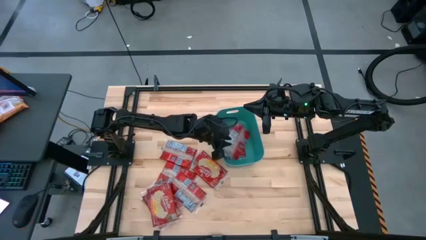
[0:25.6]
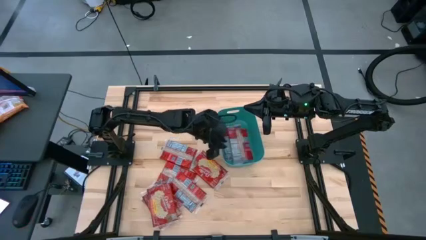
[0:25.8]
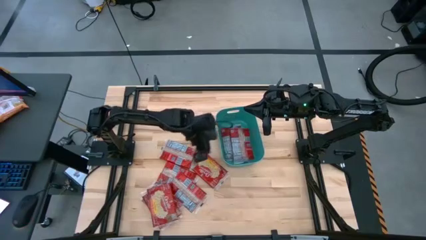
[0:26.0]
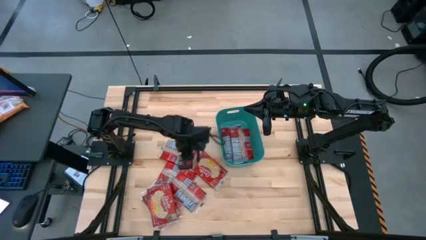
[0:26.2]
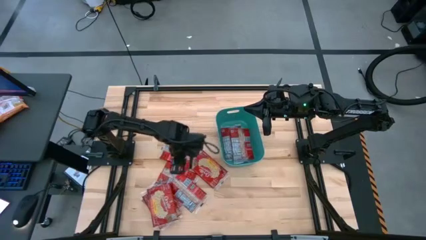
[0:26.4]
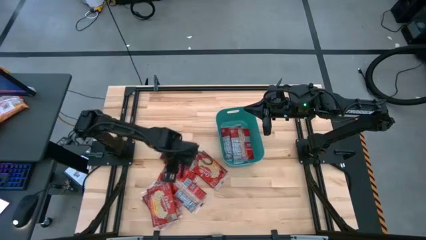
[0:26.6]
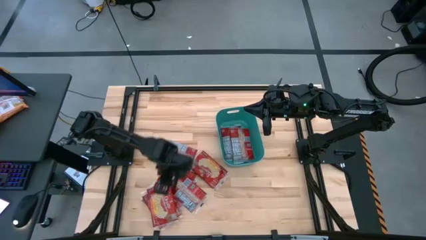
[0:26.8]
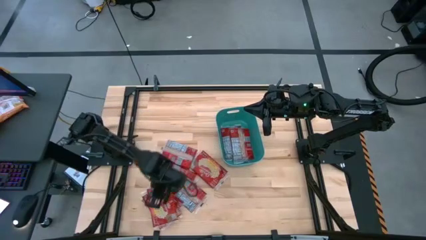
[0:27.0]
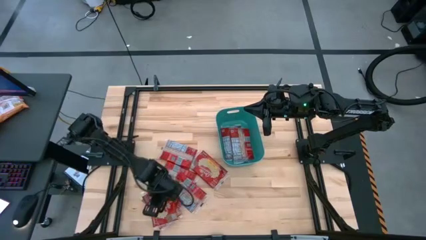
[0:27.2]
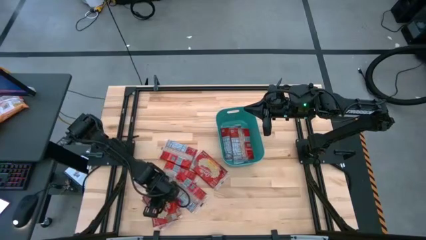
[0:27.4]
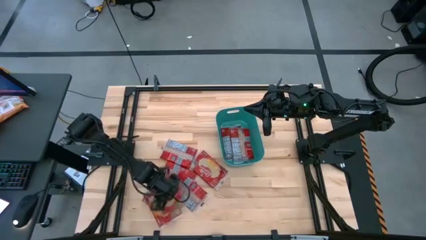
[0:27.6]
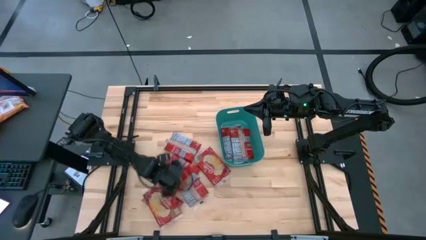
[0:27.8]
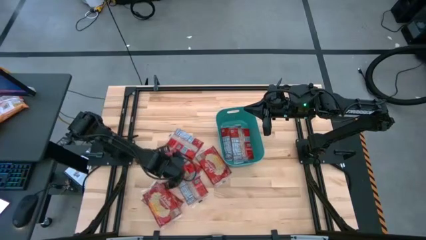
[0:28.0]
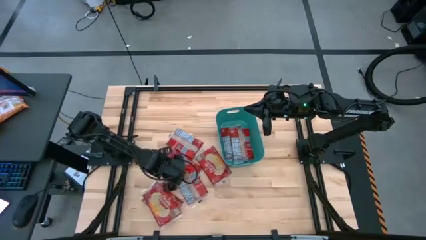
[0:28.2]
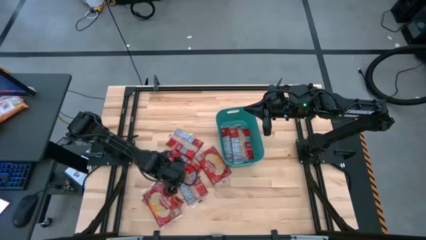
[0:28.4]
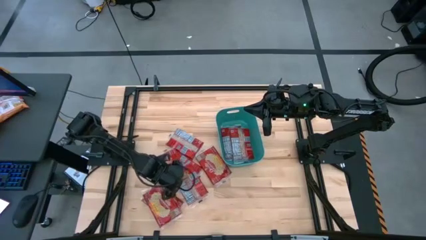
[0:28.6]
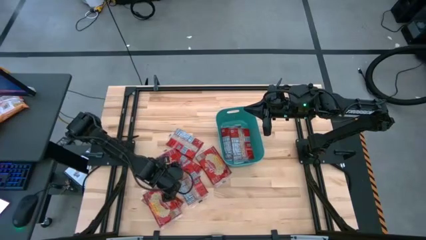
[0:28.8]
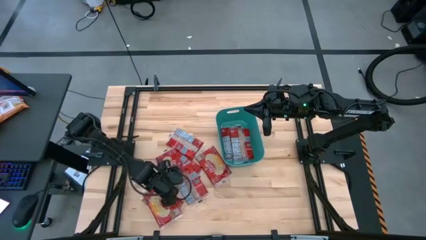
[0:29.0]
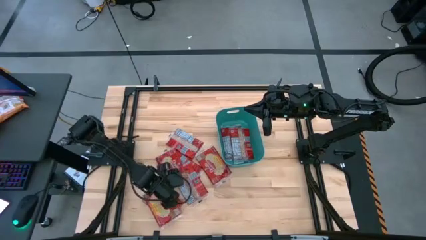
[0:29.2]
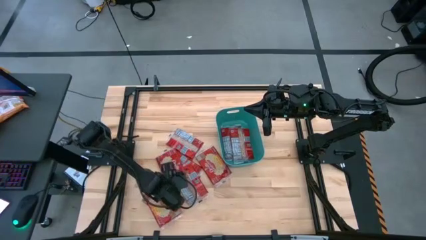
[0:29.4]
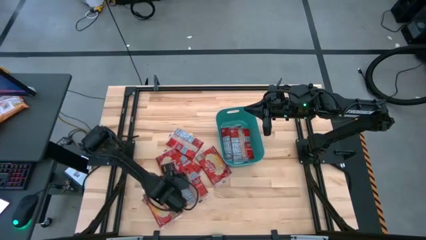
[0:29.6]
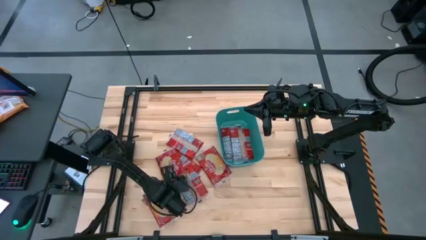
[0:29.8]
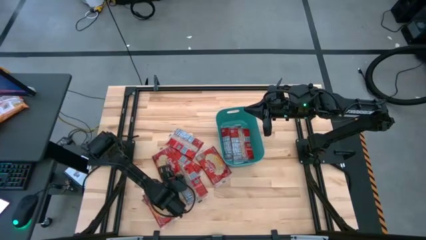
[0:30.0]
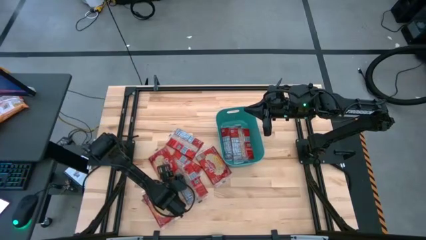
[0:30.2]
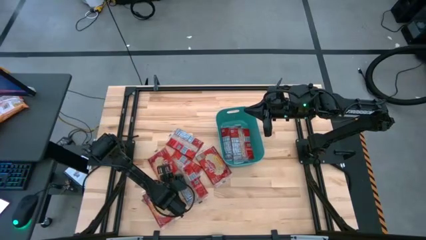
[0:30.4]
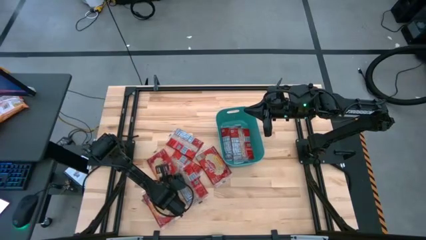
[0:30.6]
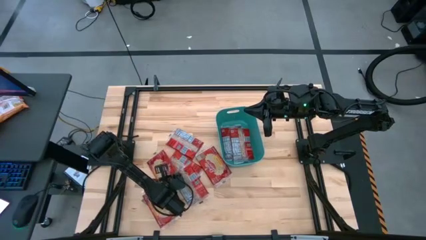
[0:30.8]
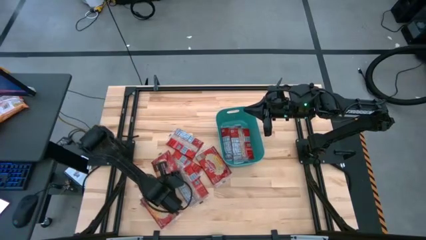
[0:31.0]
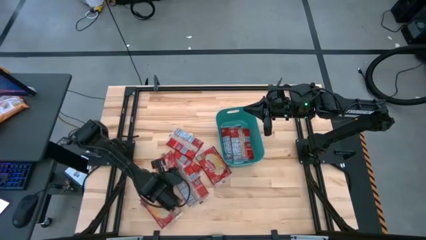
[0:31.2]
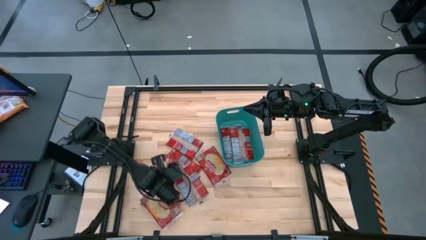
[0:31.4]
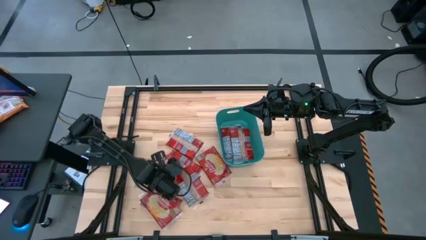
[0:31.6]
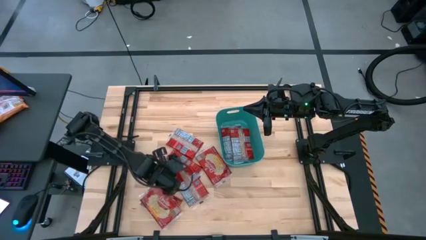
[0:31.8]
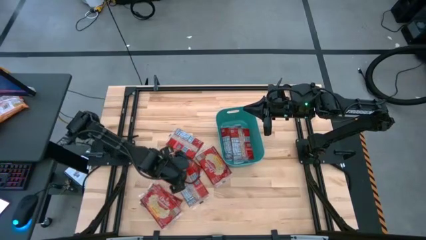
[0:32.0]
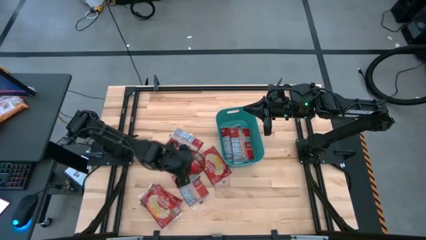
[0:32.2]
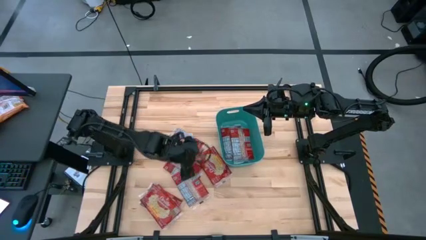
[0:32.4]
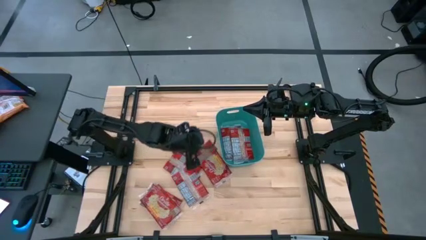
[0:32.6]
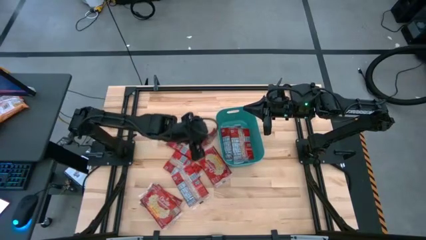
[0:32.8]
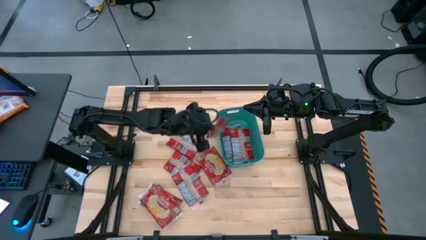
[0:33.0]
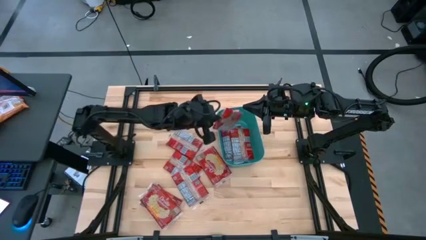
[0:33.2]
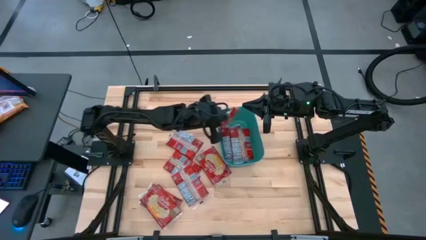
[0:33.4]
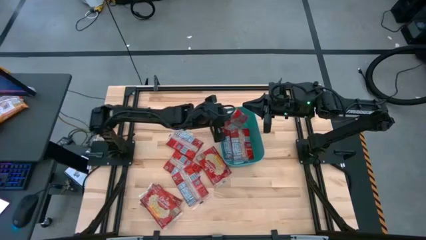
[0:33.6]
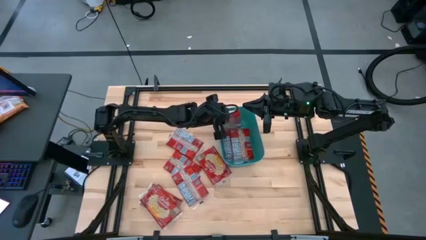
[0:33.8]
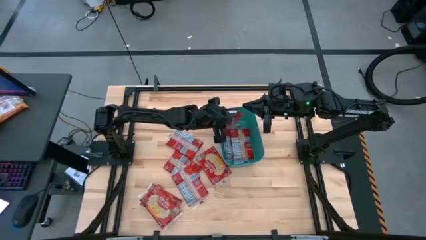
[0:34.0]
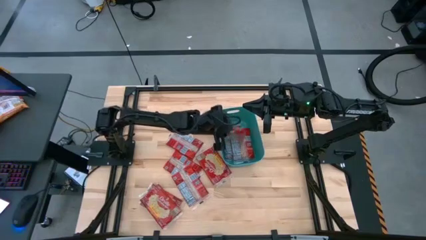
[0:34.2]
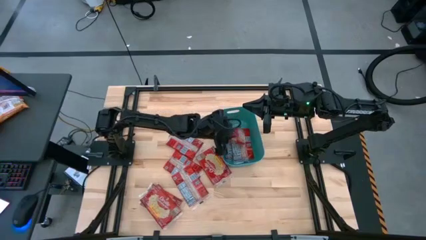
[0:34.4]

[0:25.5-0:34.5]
Task: Sort popcorn bags into baskets
Put the red popcorn pack into the green bin

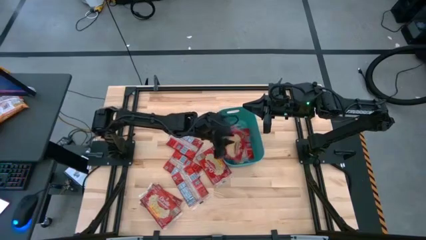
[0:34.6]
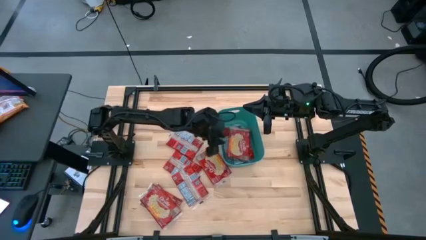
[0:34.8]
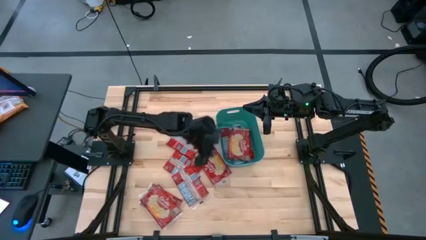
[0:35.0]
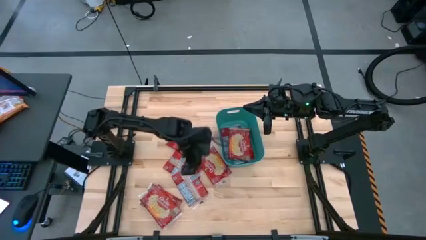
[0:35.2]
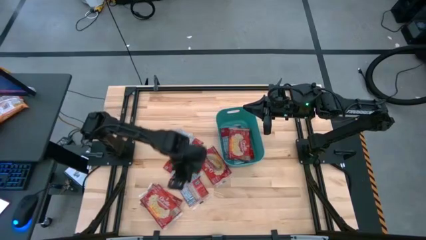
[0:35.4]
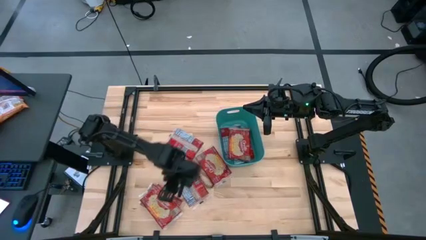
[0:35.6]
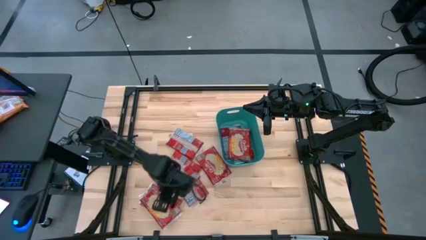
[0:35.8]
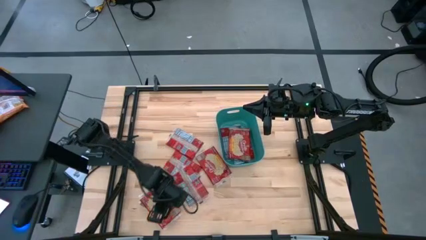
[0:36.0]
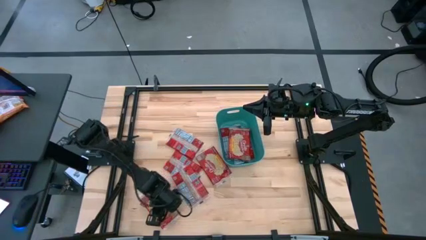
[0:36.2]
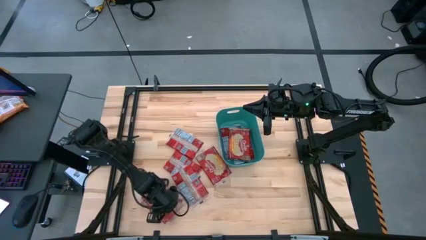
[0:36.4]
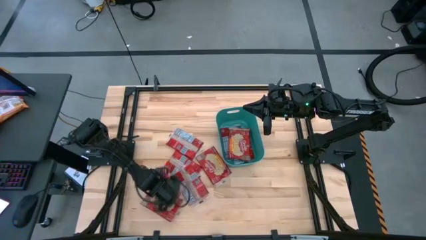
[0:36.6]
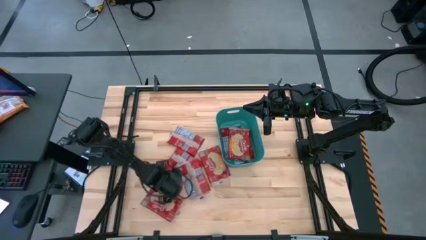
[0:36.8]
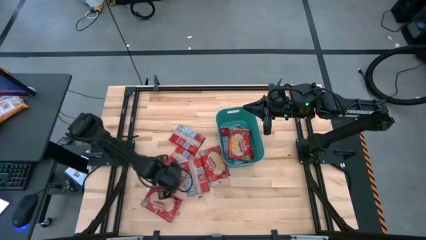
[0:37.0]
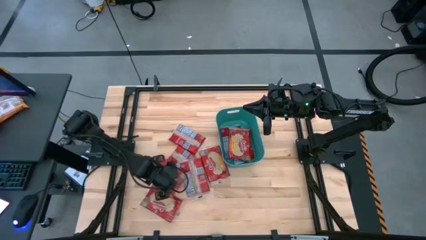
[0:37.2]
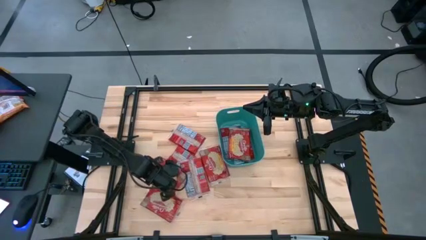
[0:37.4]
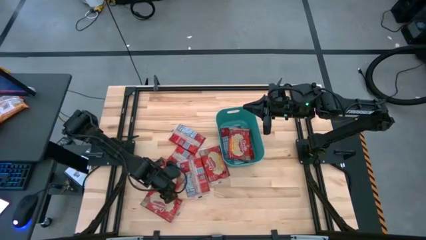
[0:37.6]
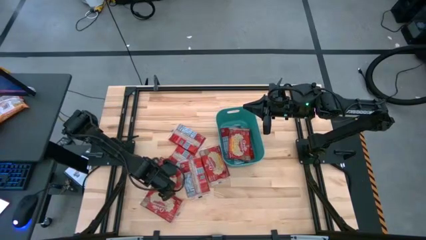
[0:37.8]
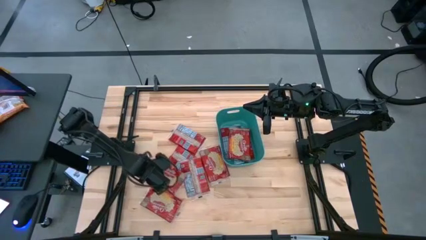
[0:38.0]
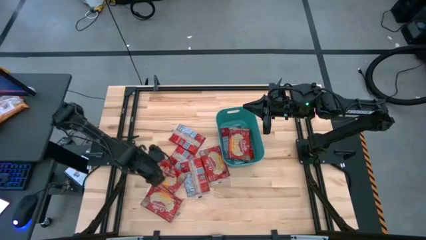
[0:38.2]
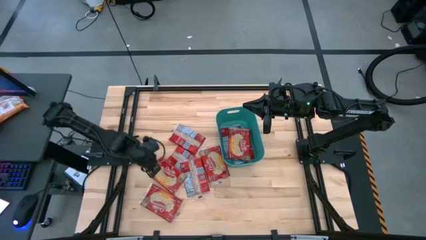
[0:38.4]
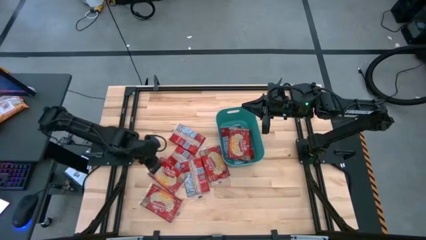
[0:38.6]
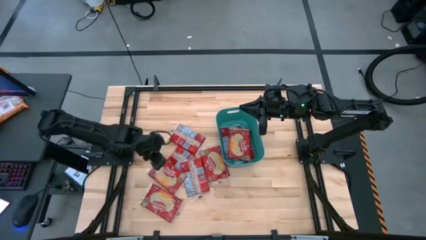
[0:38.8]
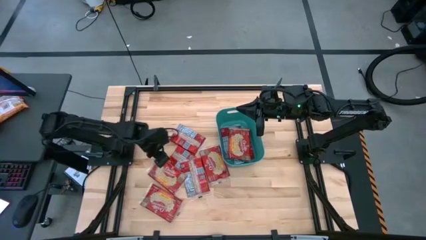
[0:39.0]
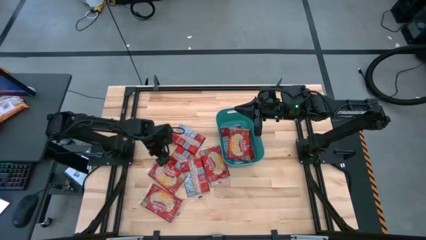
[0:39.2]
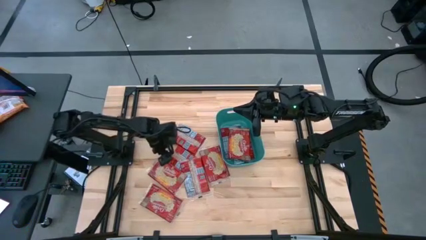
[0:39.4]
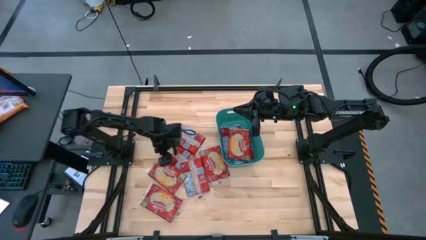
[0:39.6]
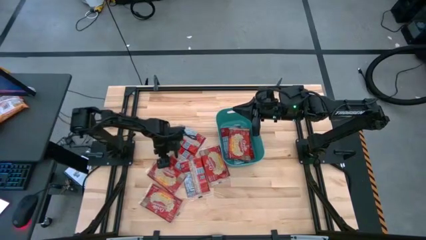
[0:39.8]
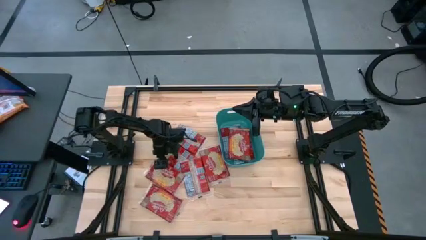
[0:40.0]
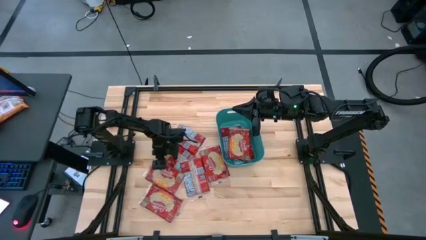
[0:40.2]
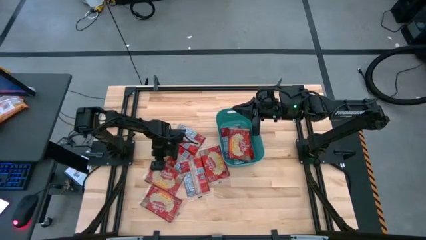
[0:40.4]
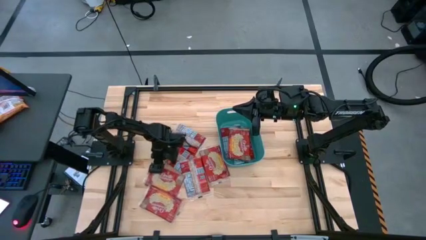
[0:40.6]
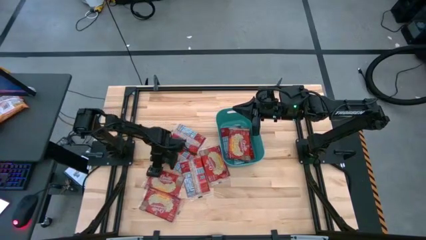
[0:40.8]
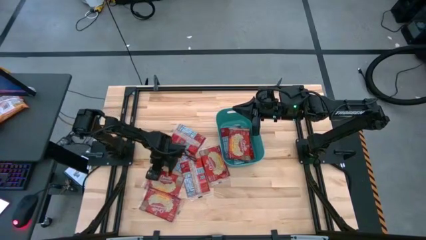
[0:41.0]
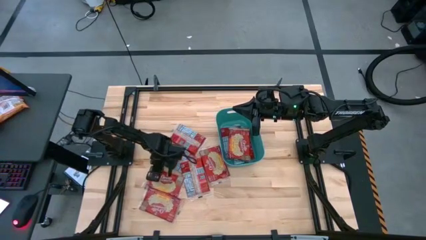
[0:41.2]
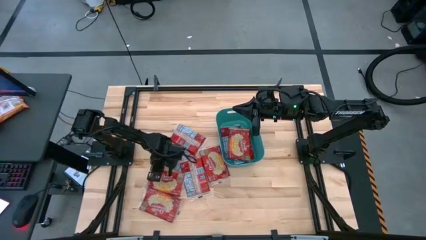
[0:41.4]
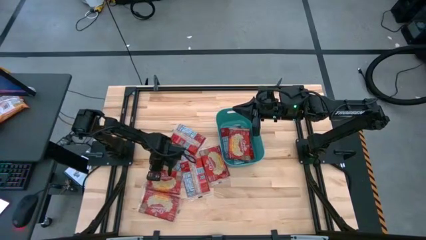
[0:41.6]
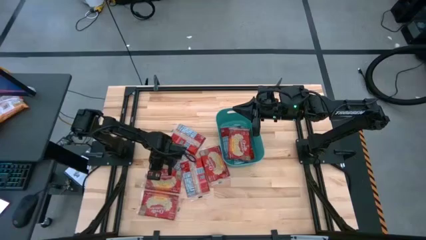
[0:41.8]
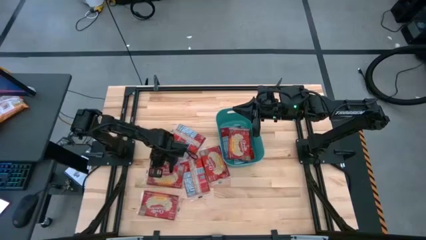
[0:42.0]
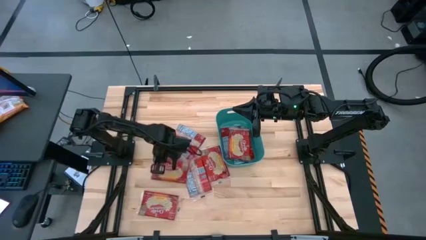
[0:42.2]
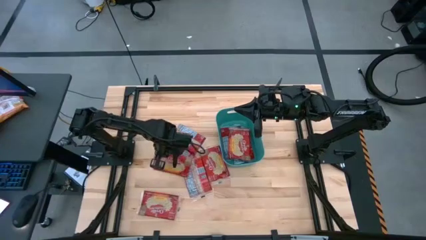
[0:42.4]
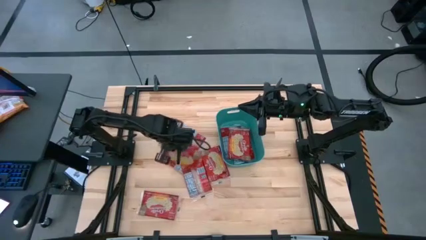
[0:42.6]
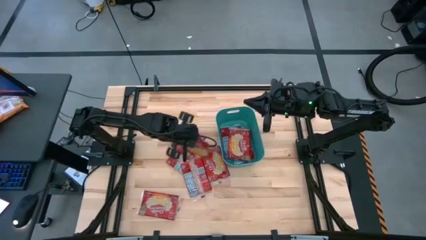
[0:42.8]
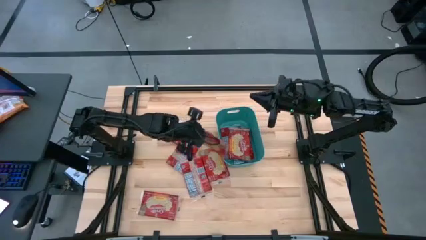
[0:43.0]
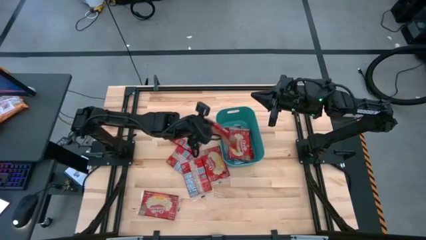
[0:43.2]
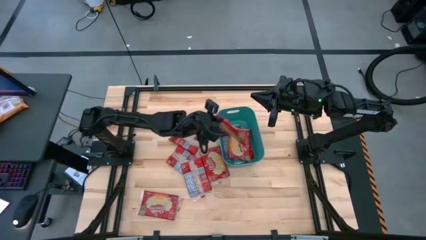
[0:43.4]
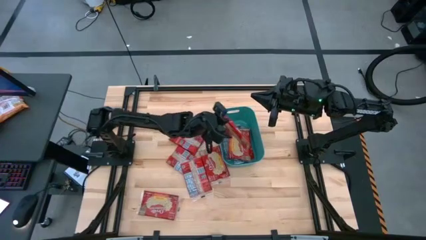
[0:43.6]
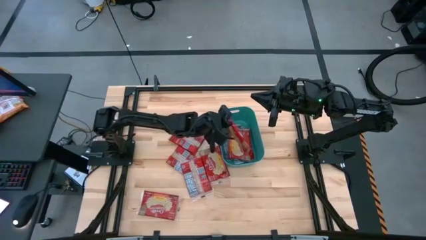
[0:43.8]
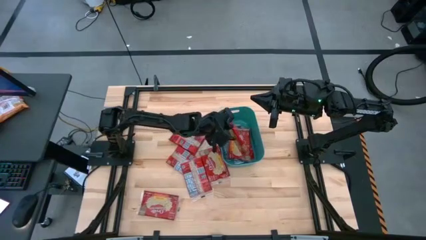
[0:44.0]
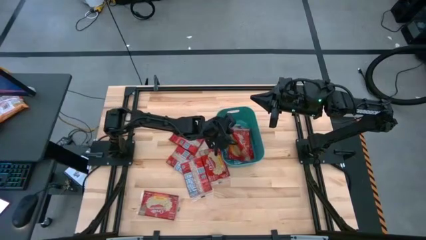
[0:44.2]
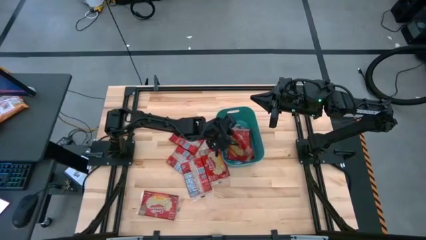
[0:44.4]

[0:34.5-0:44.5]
Put the red popcorn pack into the green bin
